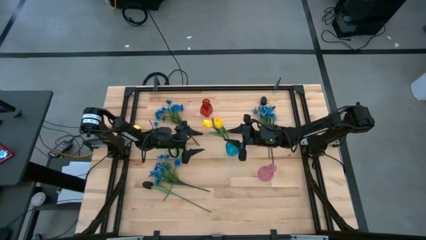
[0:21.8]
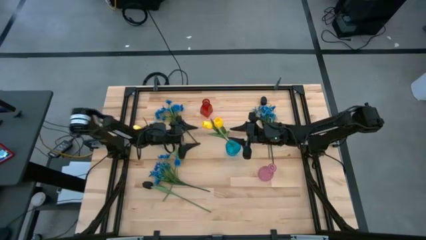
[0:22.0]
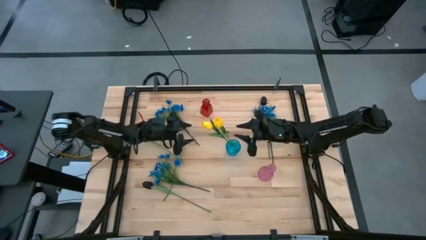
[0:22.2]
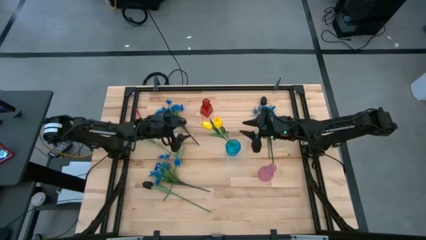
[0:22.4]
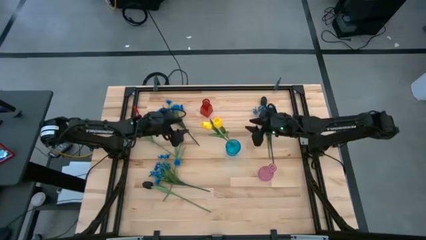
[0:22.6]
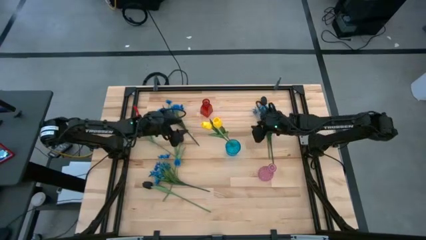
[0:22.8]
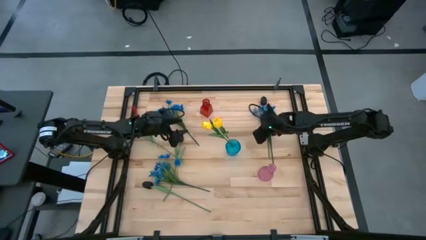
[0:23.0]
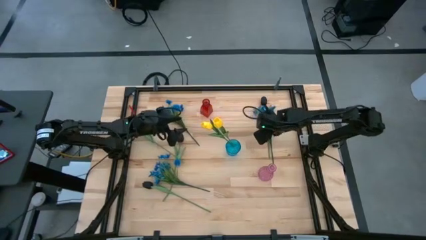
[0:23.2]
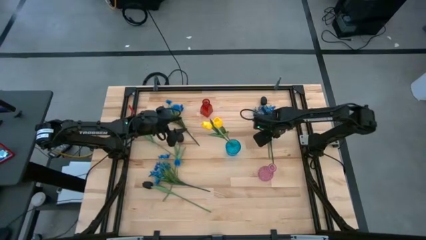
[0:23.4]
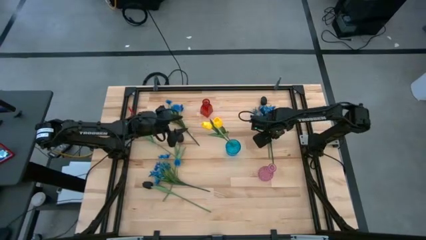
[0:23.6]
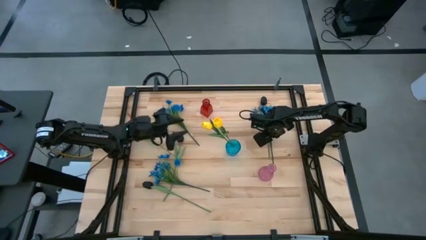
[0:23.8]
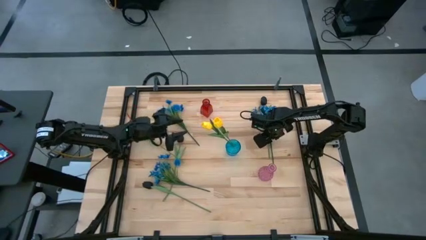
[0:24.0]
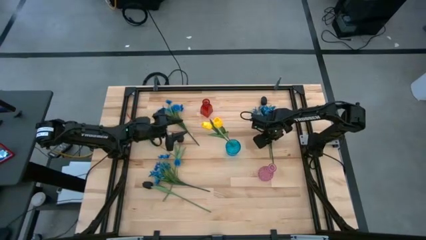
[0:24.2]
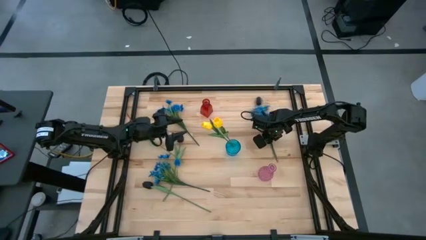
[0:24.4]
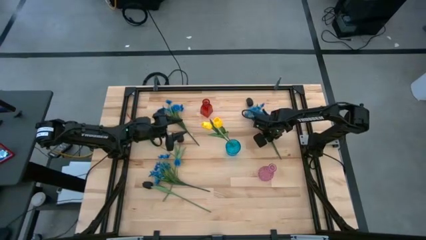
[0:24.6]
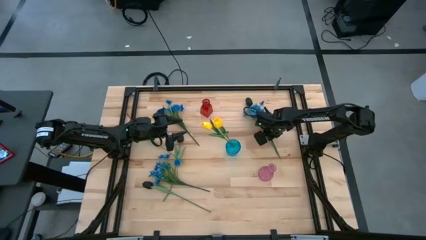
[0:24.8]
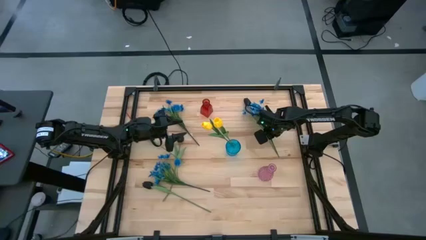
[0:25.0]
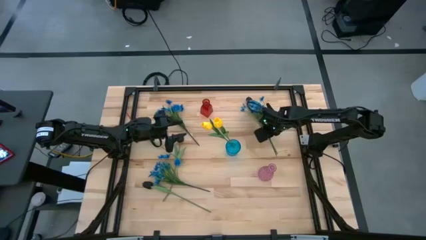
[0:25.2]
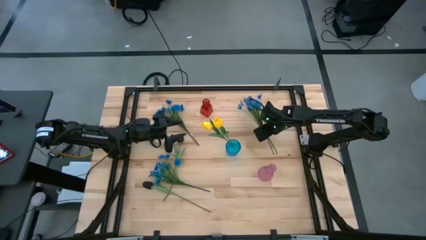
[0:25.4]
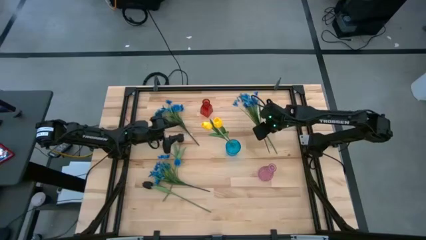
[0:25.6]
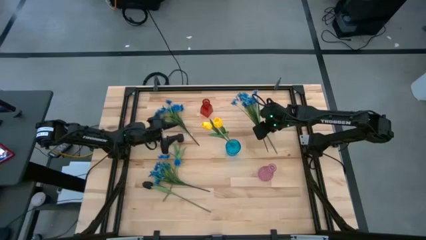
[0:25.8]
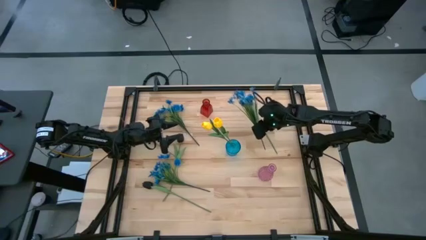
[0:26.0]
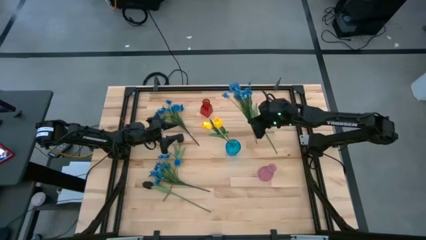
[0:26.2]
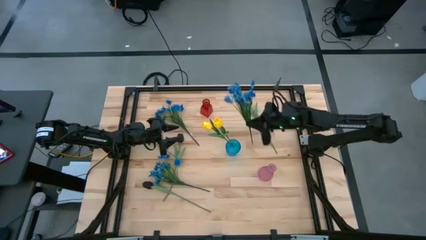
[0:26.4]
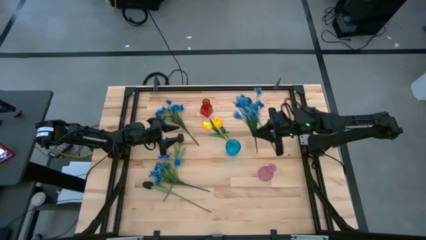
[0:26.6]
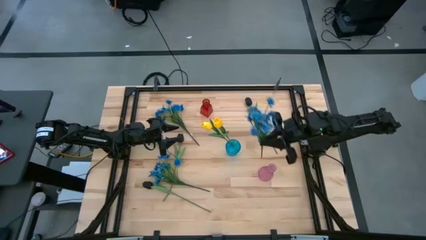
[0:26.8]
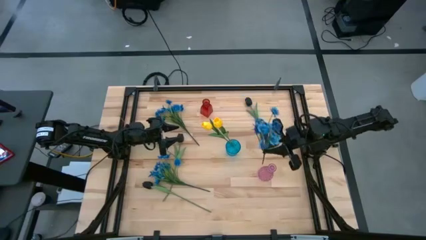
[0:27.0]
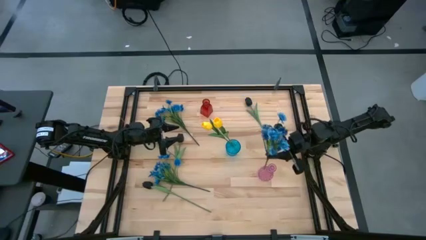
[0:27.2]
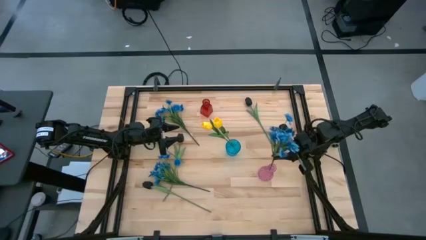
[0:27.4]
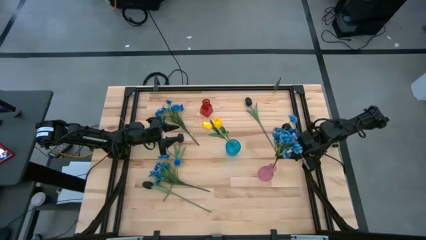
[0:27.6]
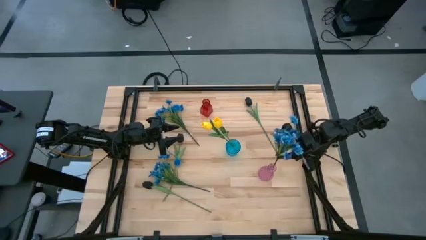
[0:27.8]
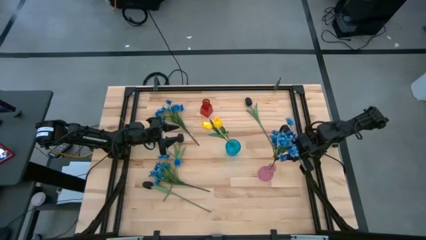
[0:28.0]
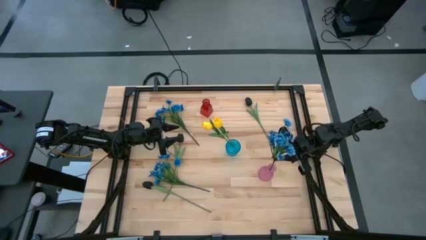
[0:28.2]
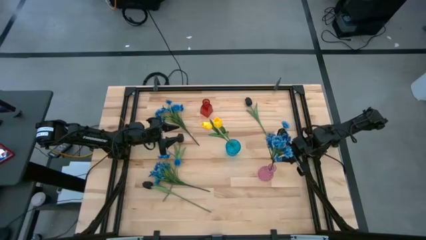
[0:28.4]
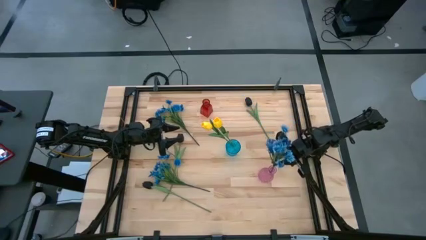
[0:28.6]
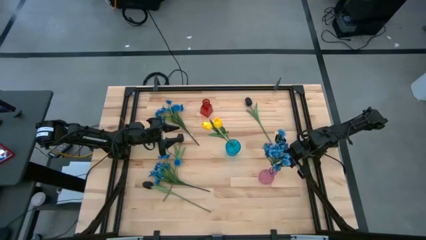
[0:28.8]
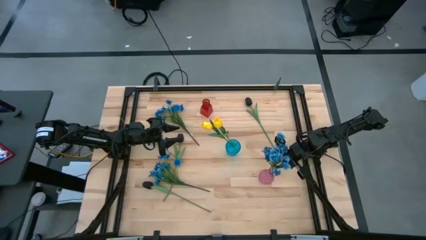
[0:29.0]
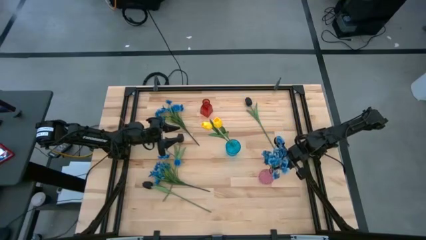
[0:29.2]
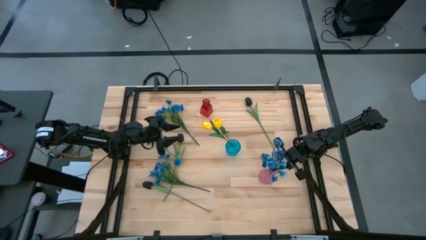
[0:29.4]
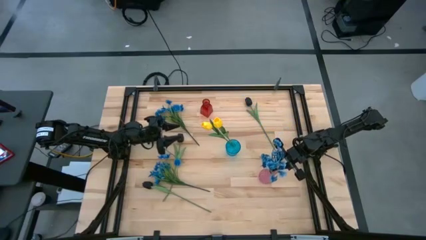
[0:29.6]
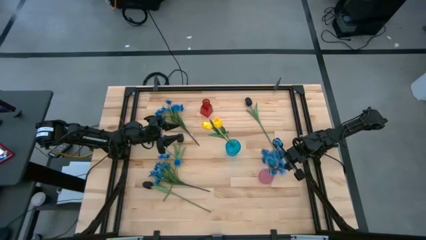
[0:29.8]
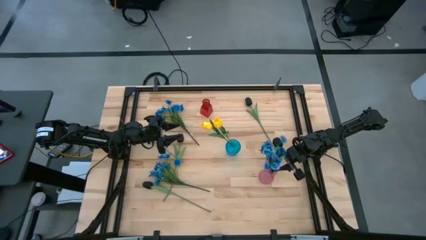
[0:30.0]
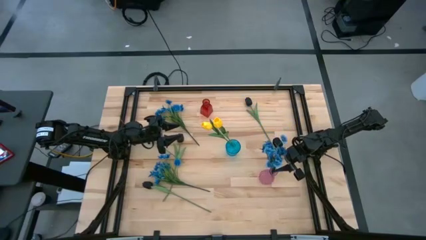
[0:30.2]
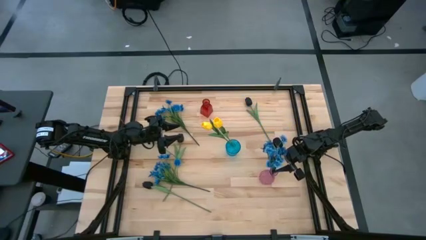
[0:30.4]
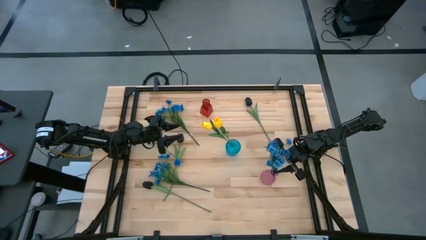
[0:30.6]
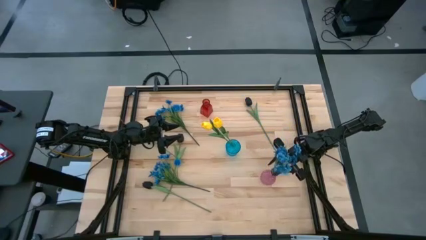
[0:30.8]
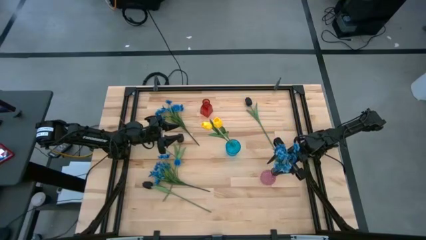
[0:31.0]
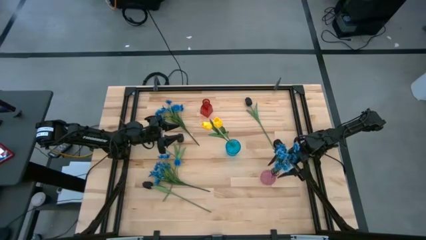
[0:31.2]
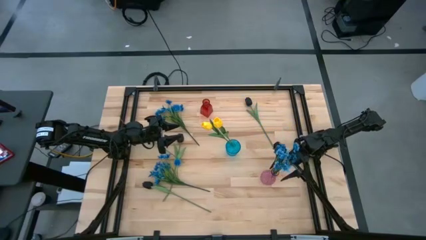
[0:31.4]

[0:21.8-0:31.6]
Task: Sort flowers into vase by color
Put the blue flowers into the pink vase

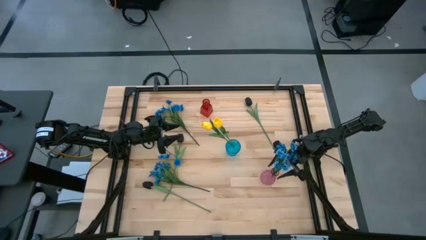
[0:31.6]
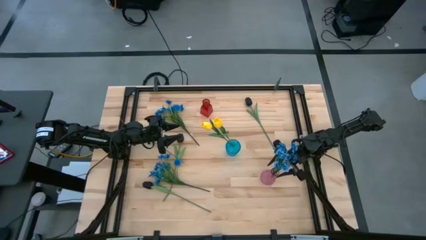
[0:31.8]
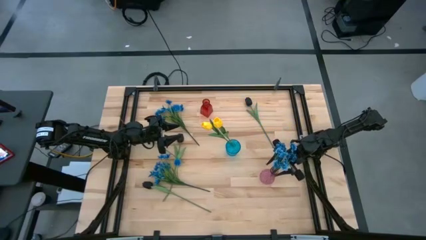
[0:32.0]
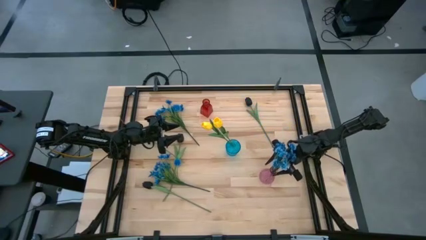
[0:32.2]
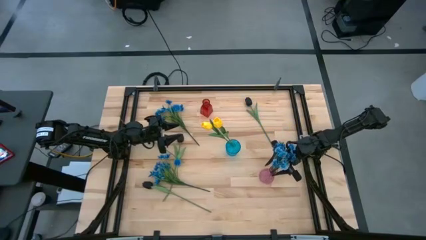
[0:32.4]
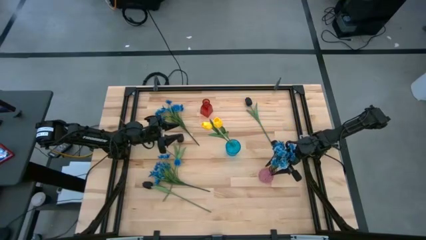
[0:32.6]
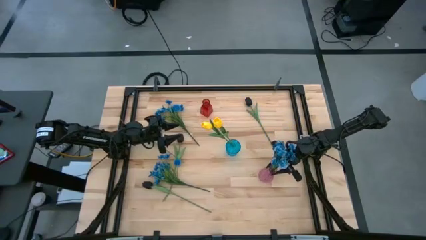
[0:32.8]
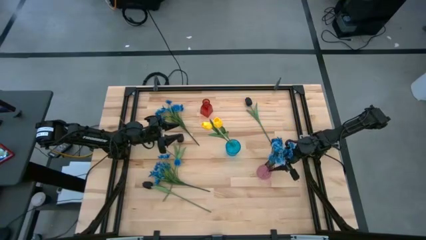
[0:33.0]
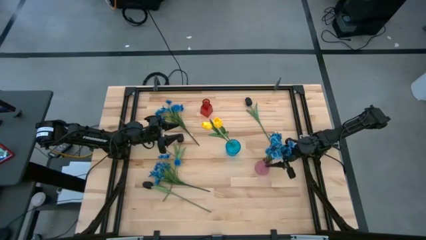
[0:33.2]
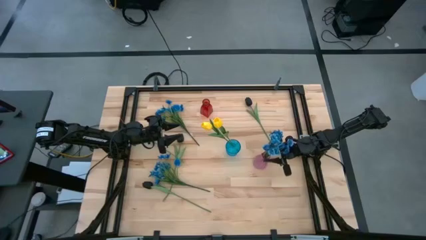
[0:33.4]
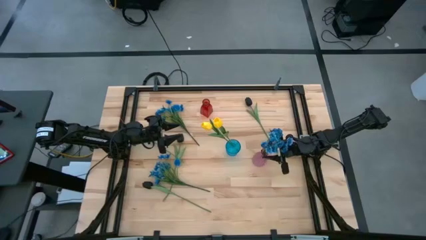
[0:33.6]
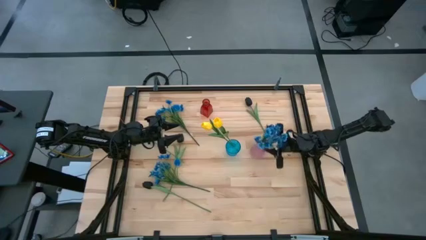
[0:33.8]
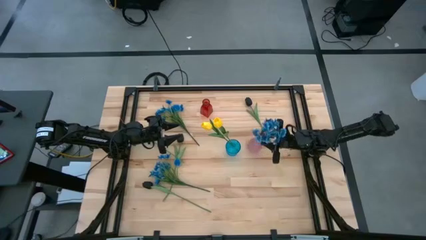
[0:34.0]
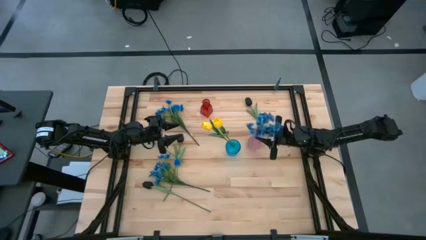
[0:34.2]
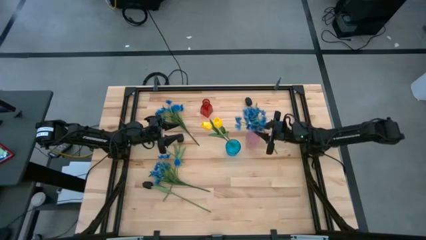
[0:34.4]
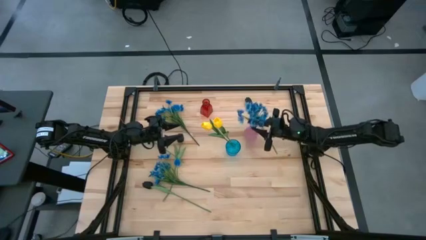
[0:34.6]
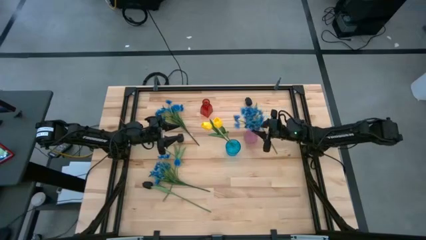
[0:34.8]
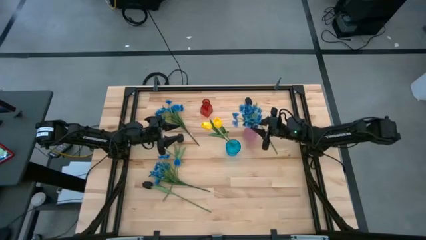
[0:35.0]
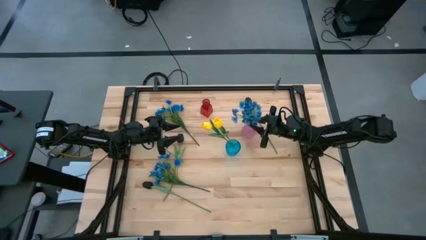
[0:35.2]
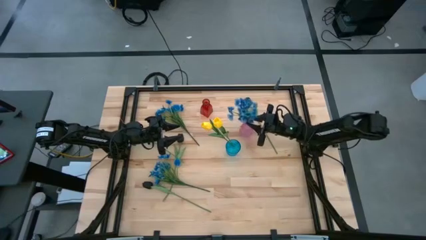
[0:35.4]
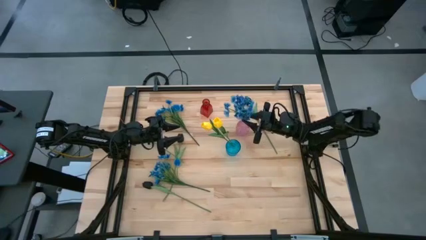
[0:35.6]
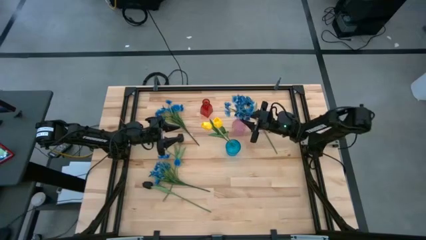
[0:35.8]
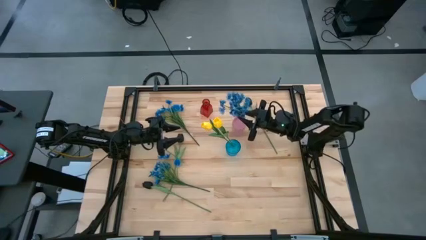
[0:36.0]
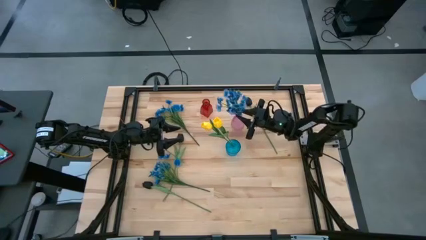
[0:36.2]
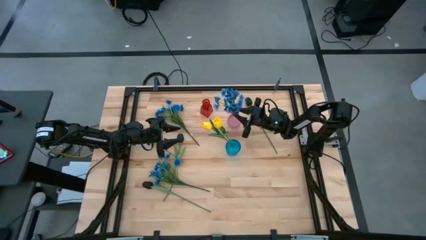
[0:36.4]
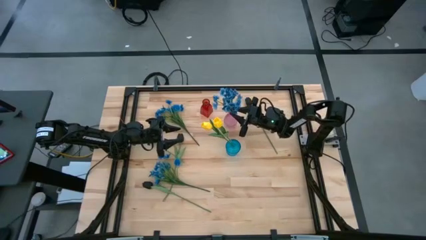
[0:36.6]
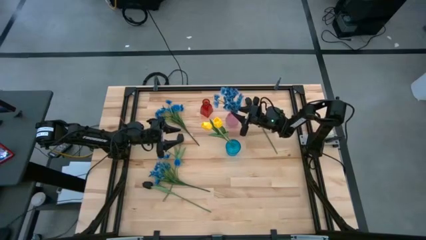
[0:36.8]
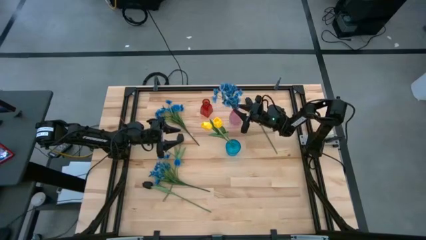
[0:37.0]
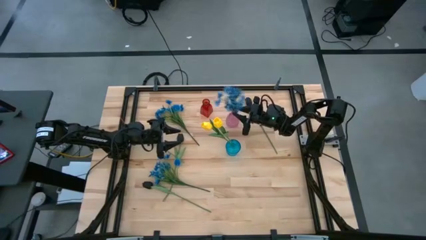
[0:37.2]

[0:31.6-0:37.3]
Move the pink vase to the middle top of the table
